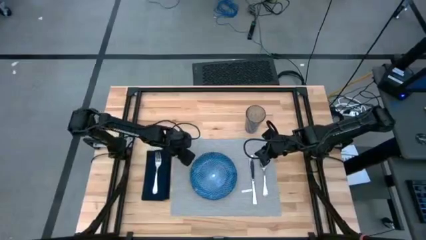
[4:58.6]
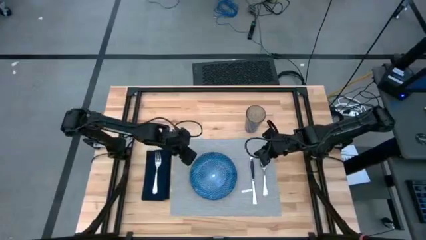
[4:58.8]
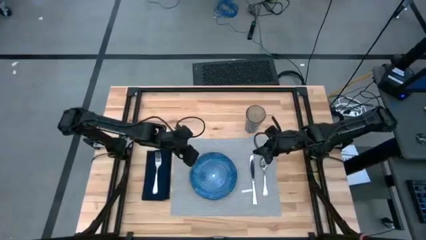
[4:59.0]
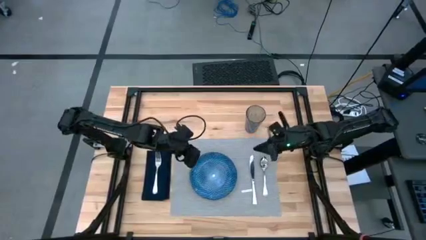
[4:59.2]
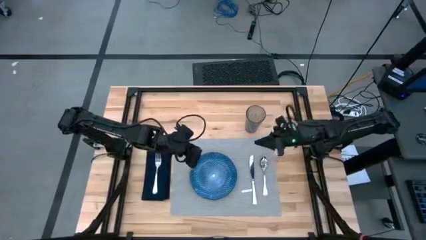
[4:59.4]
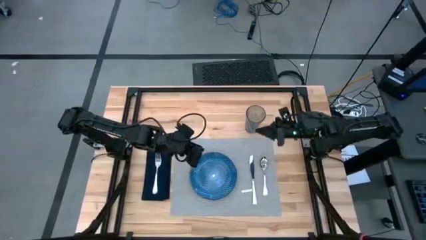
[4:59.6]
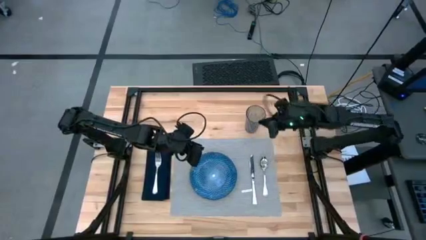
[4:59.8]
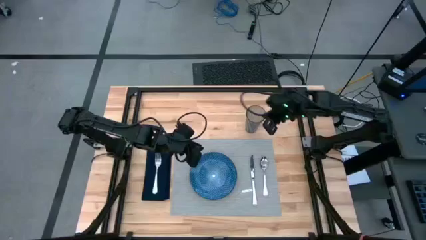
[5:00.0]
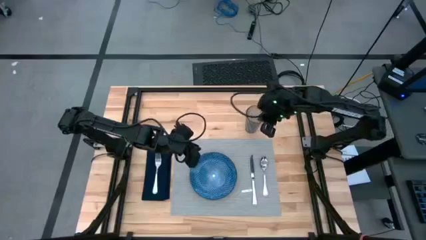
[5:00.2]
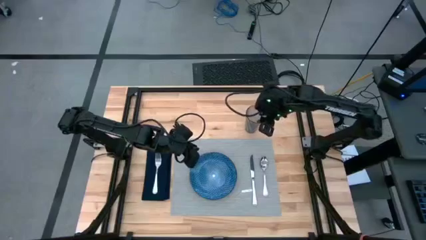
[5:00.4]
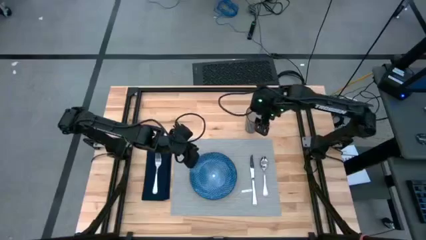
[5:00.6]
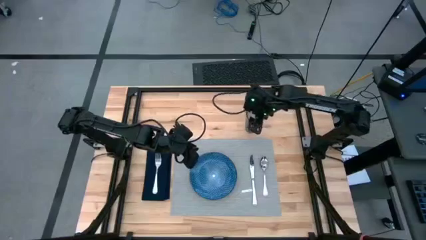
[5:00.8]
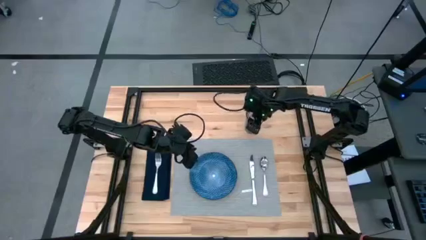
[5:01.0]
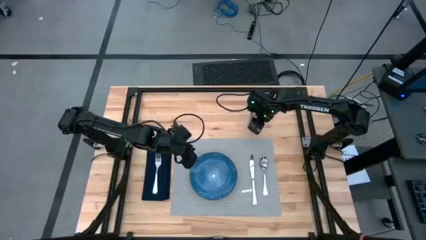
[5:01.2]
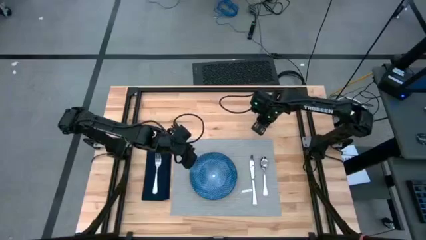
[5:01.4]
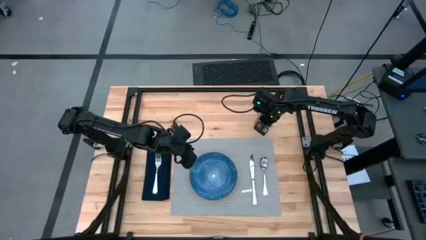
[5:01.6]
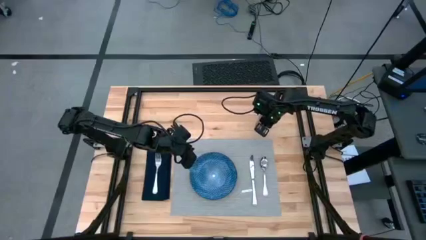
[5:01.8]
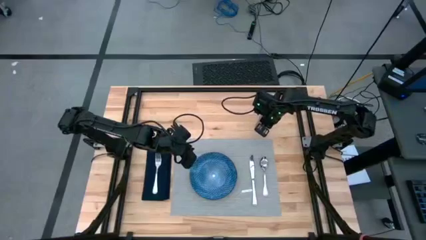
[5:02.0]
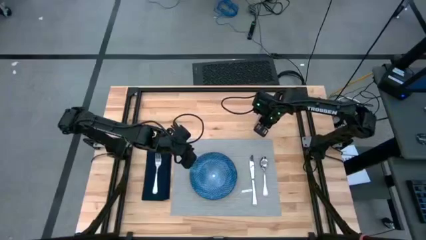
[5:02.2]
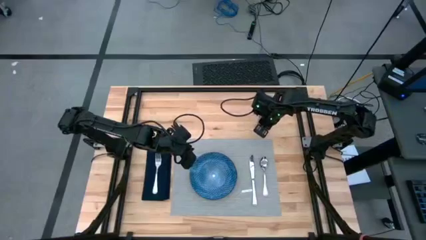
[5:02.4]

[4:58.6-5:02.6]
Task: Set table place
Adjust the blue transparent cup

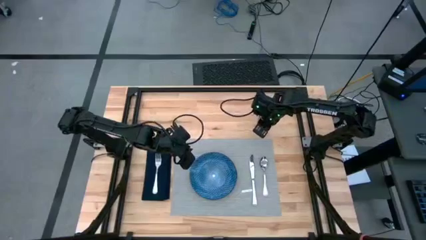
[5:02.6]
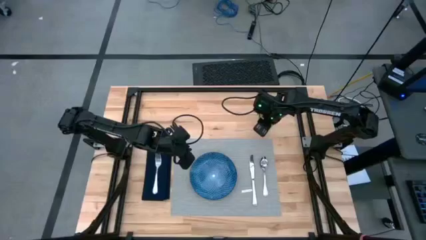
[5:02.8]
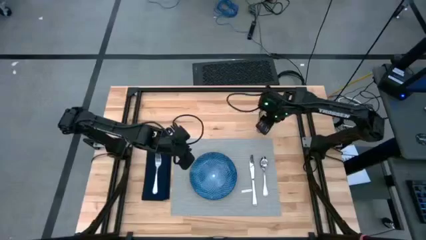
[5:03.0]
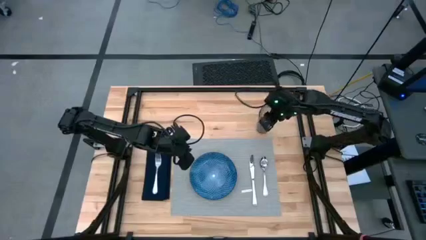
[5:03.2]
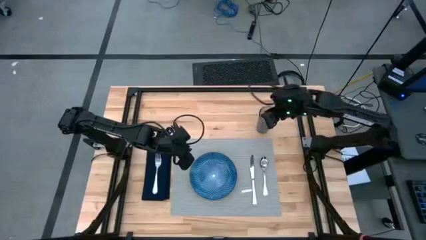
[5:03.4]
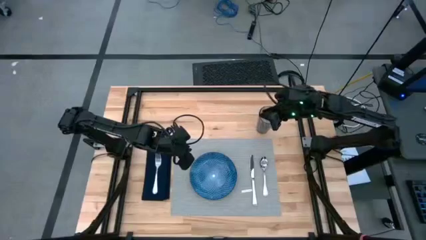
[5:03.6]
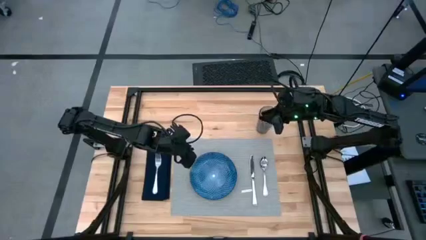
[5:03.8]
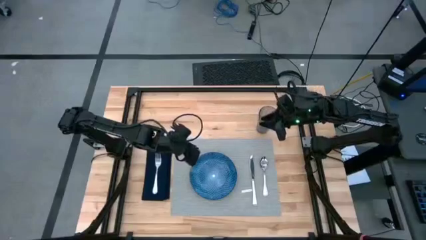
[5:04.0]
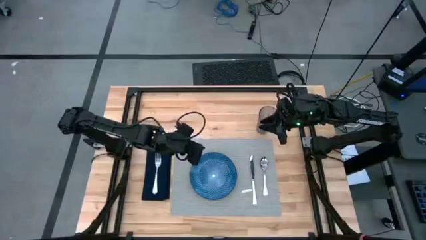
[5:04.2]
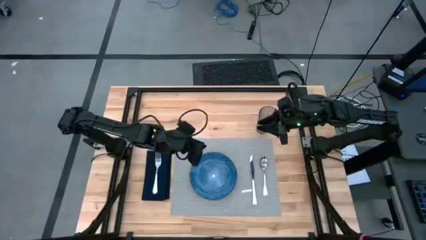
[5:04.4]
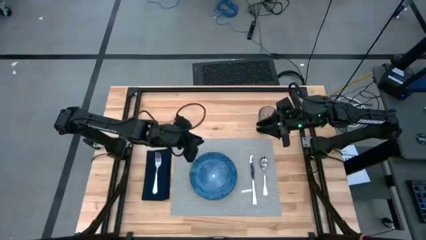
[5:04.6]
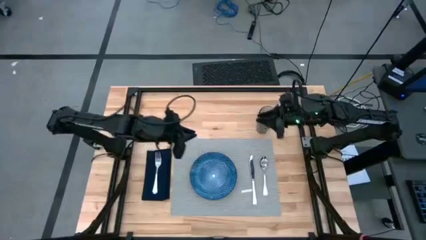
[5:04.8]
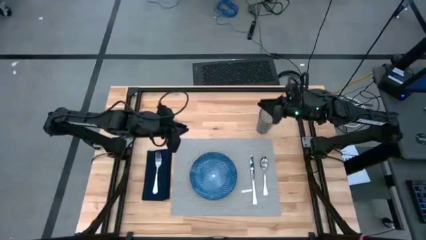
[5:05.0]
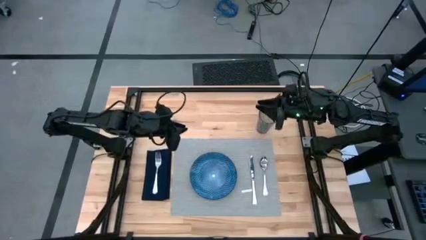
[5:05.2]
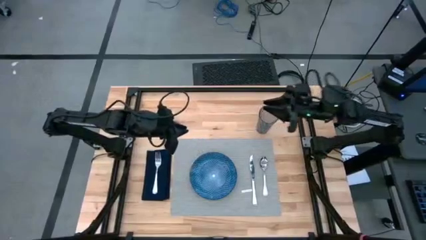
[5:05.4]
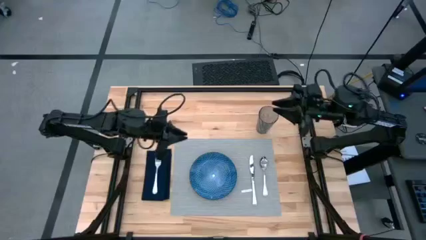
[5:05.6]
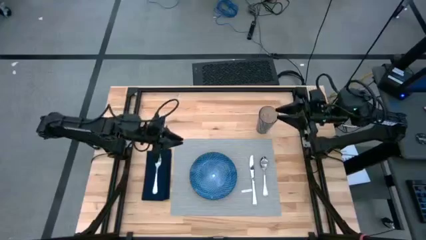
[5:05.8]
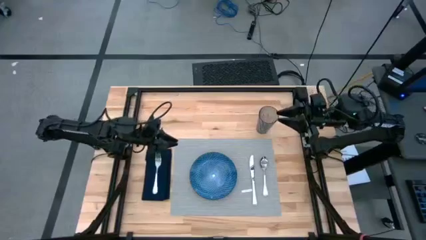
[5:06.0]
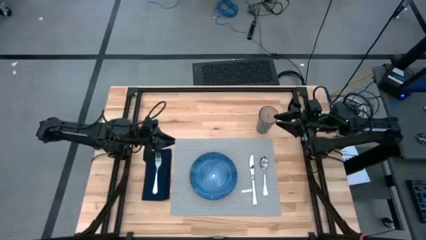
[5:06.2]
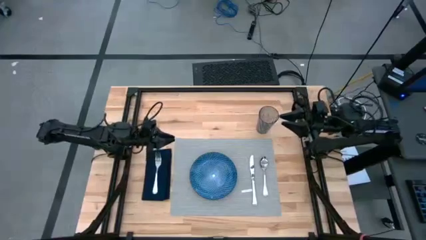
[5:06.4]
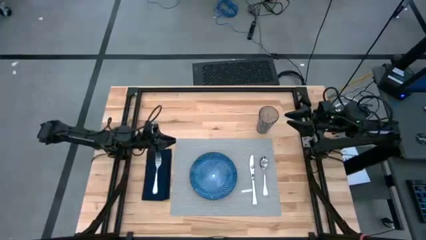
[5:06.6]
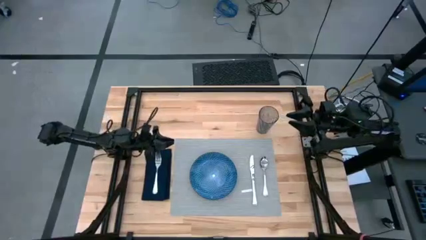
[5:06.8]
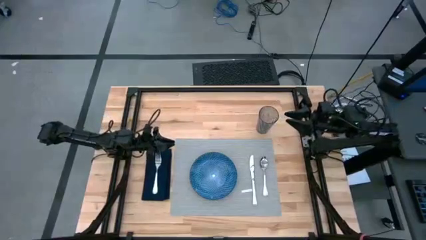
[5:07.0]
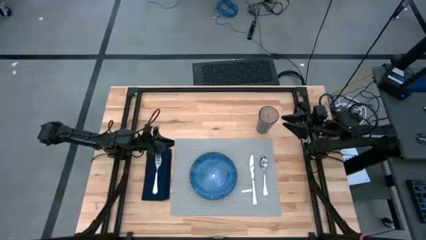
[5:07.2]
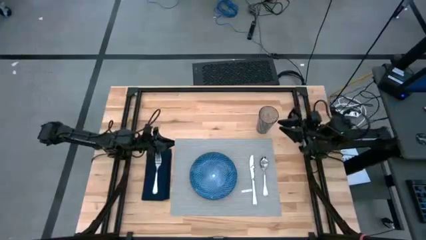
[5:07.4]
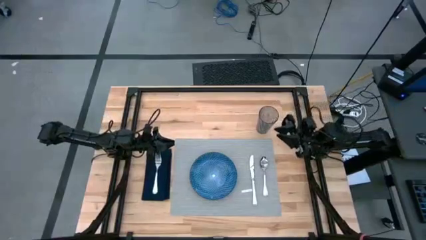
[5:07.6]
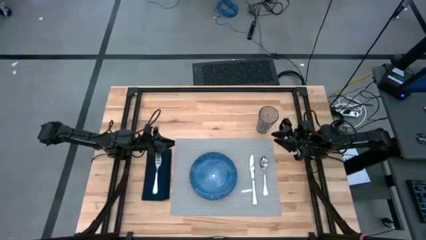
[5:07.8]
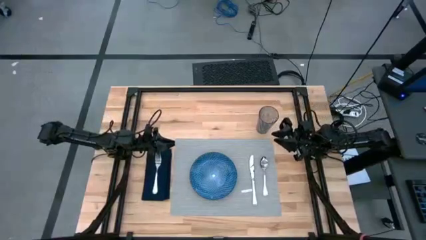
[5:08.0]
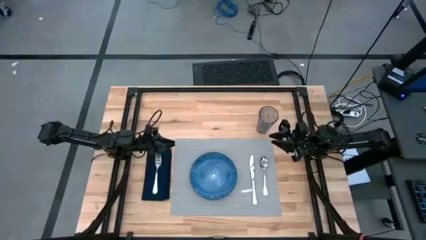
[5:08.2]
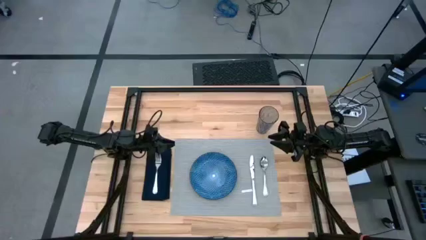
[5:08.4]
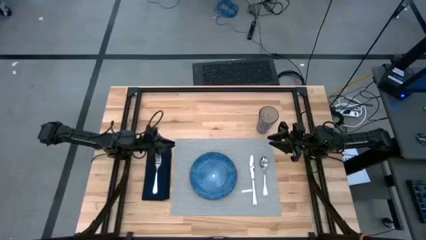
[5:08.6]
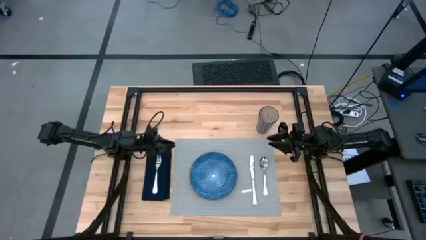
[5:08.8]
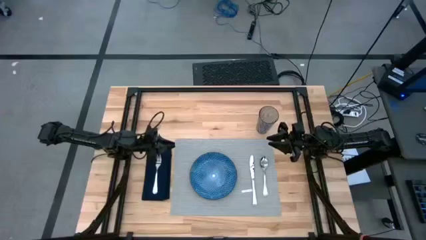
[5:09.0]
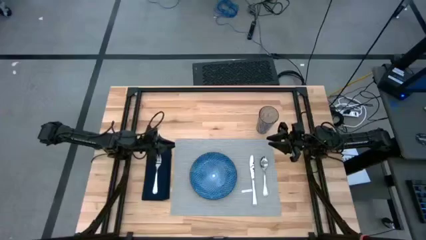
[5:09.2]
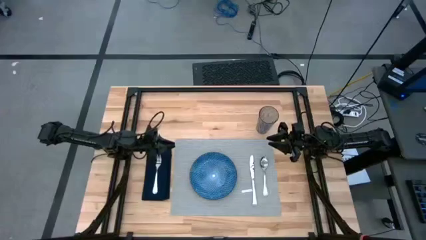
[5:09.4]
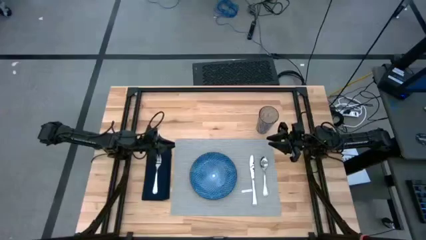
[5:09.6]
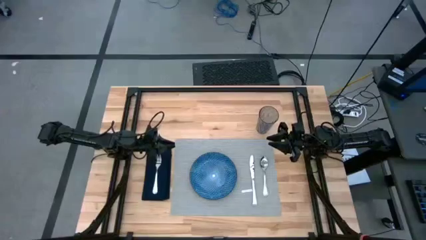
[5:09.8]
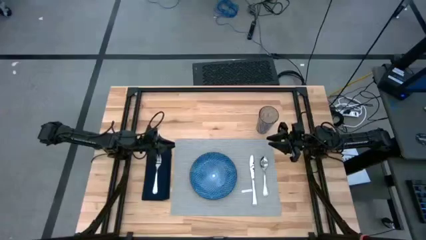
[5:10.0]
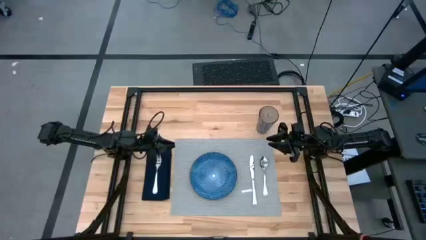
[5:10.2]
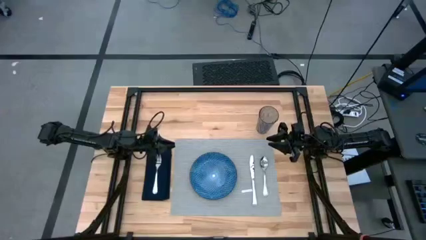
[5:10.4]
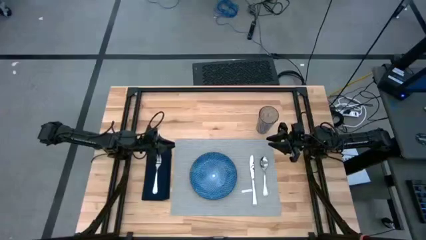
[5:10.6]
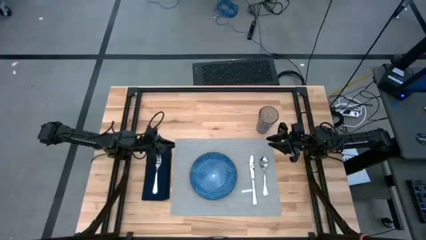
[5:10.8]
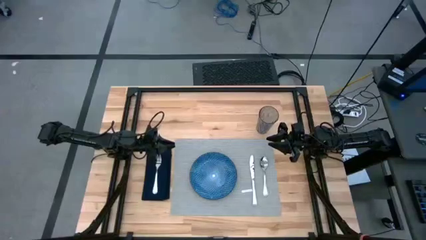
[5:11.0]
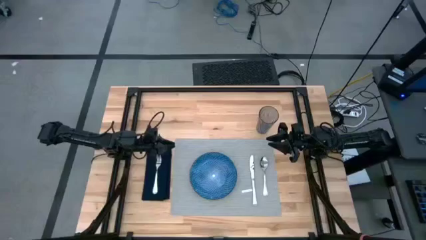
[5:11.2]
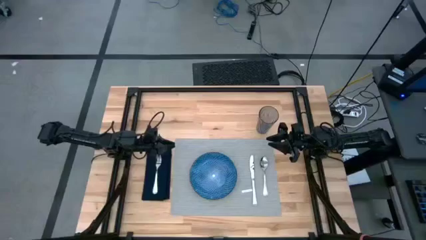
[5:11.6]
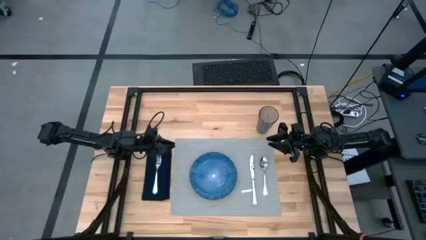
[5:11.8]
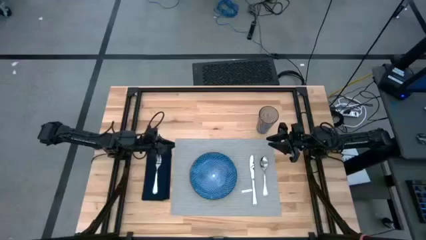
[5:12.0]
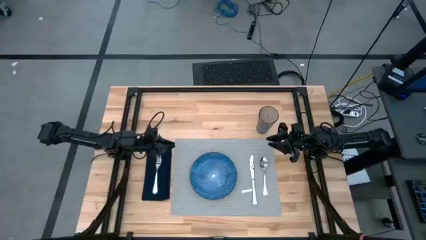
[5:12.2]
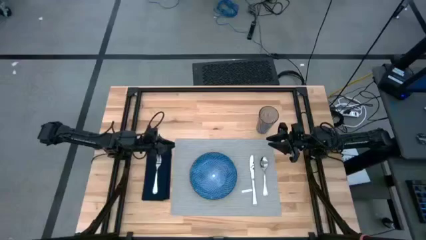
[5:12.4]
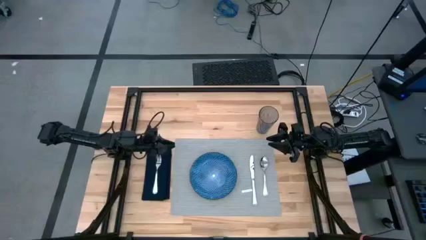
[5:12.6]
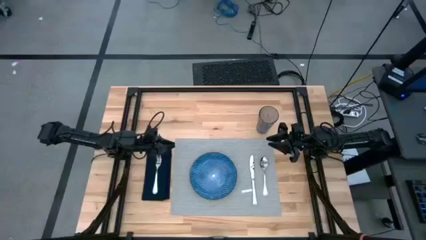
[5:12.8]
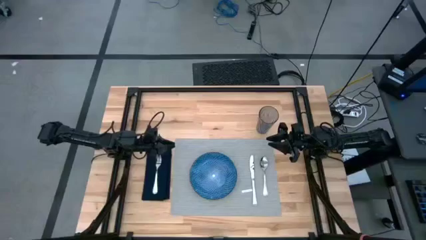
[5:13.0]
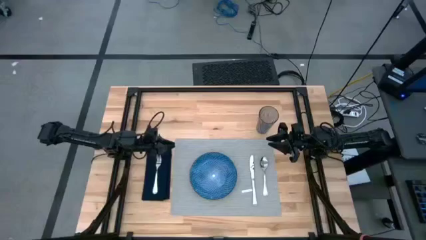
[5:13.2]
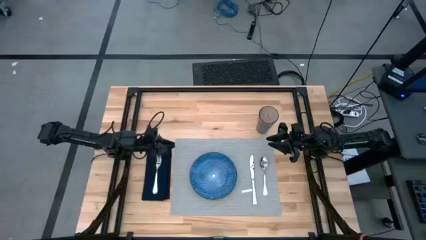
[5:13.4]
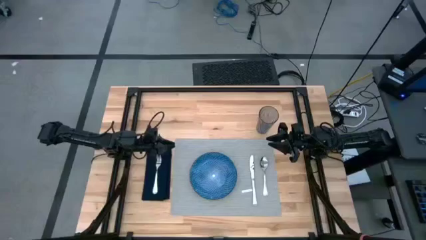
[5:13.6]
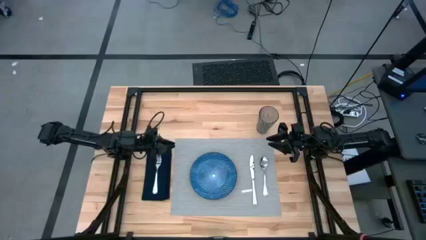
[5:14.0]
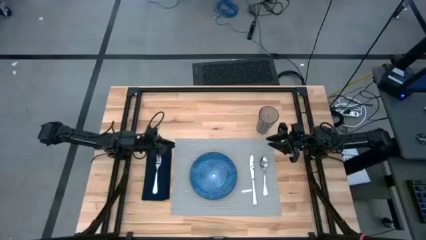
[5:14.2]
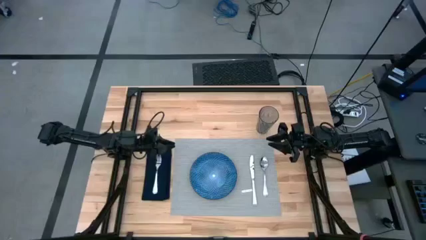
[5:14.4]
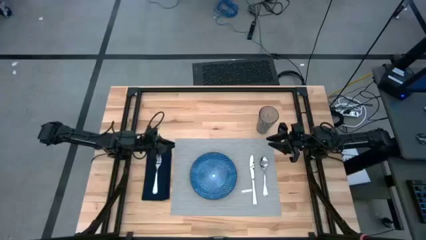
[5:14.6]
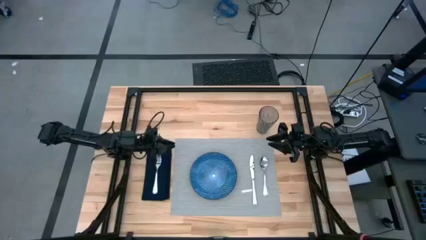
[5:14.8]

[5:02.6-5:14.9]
Return to Home Position

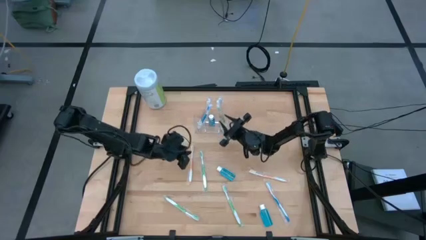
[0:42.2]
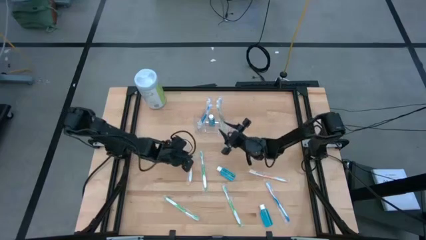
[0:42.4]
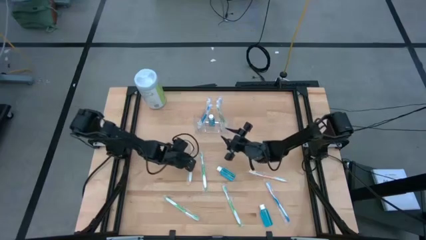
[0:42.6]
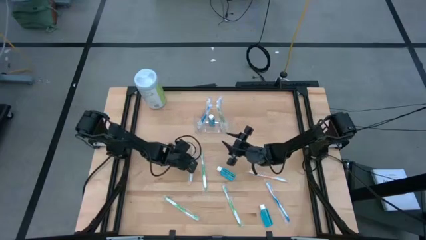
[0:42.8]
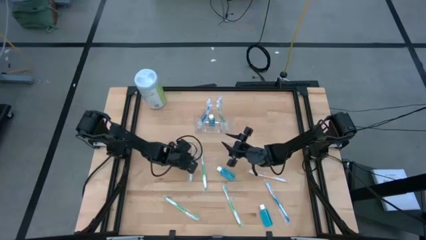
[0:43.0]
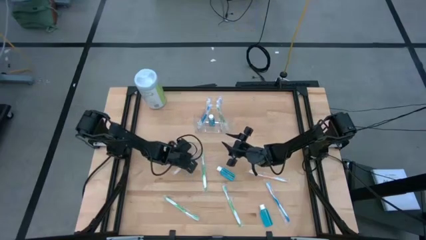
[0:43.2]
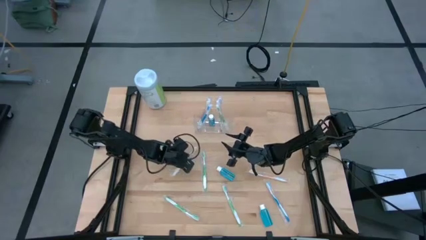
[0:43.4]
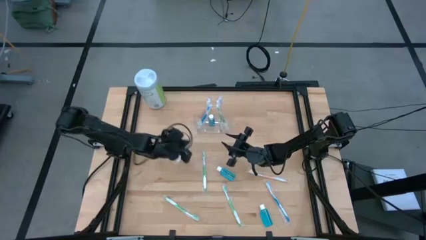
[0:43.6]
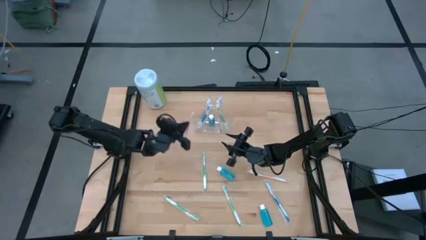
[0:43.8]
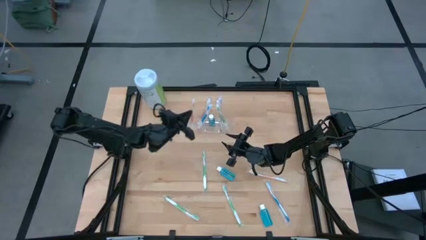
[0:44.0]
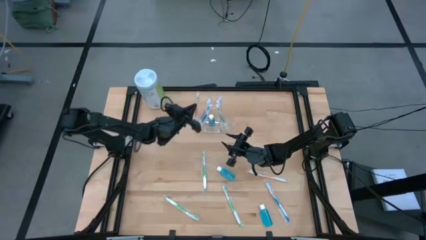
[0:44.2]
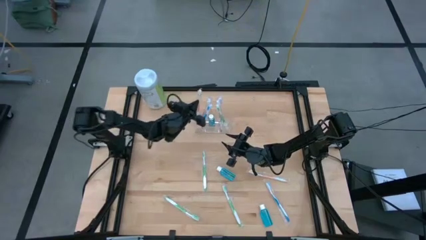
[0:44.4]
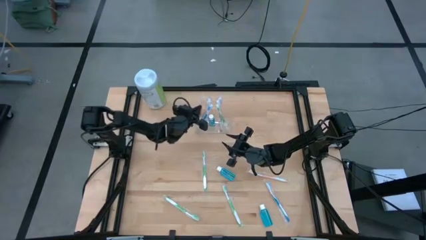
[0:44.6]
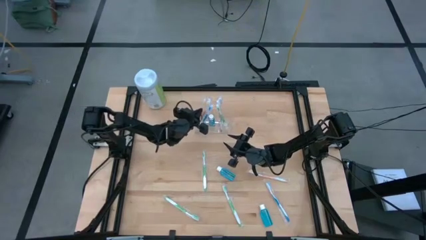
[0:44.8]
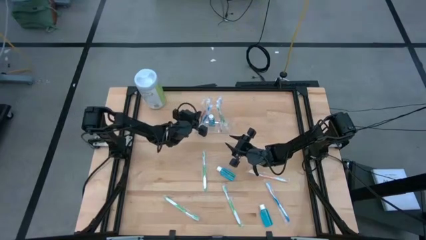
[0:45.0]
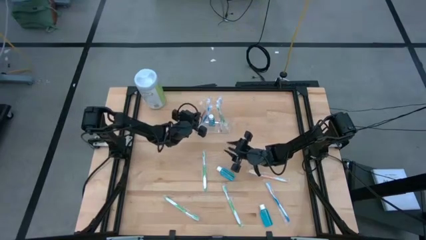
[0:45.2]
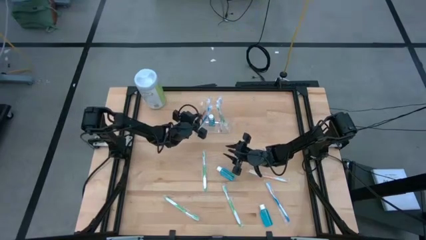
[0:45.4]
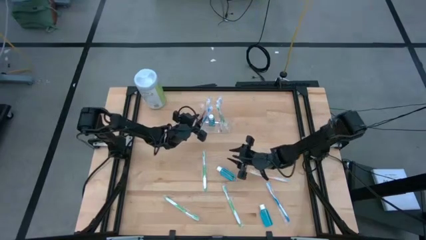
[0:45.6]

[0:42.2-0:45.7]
Task: Pick & Place toothbrushing station
Put the orange toothbrush to the left of the transparent organizer
